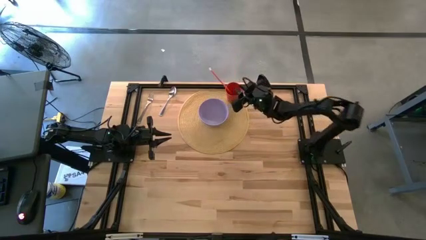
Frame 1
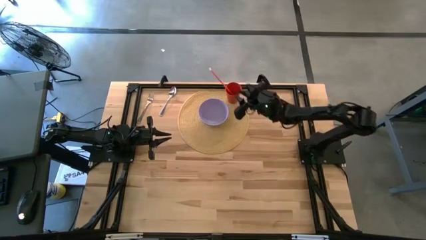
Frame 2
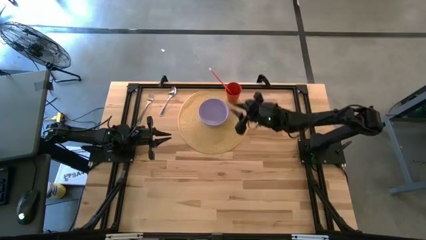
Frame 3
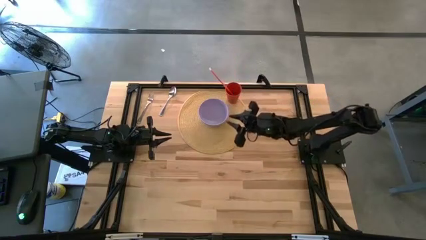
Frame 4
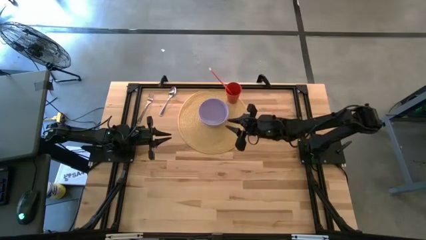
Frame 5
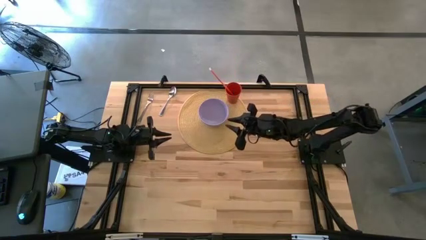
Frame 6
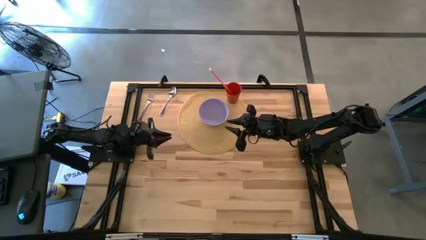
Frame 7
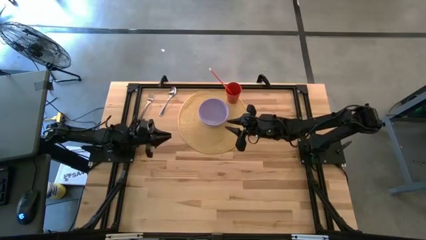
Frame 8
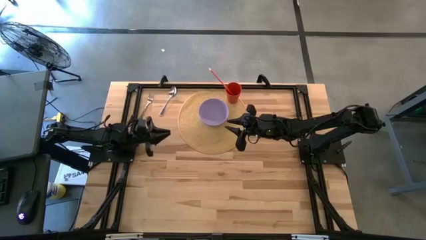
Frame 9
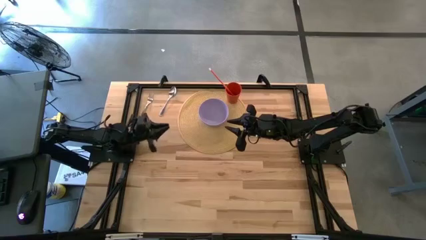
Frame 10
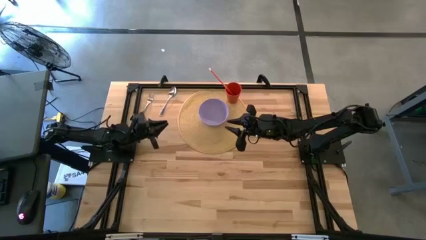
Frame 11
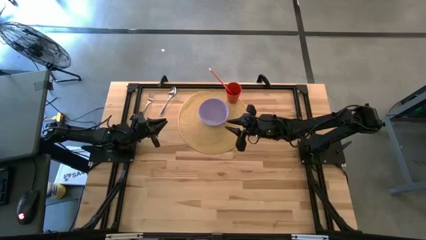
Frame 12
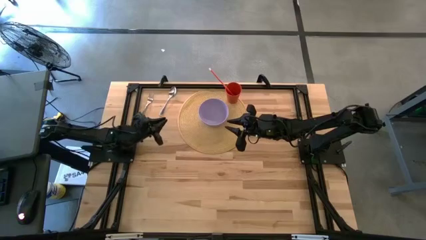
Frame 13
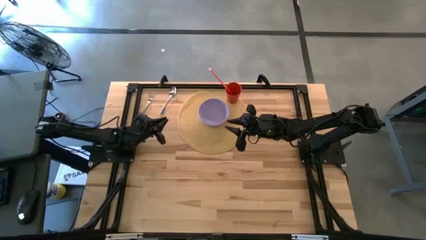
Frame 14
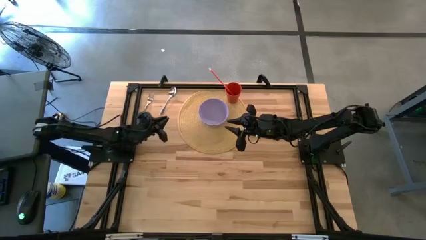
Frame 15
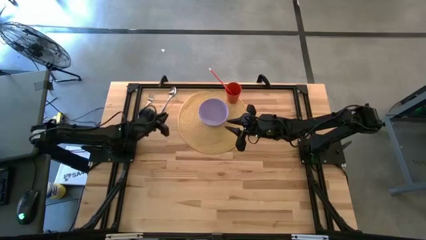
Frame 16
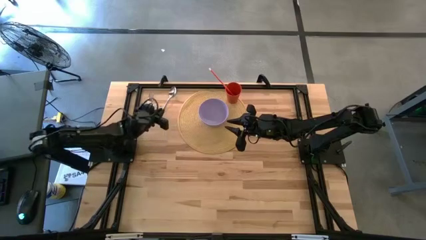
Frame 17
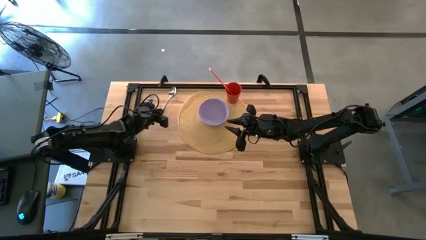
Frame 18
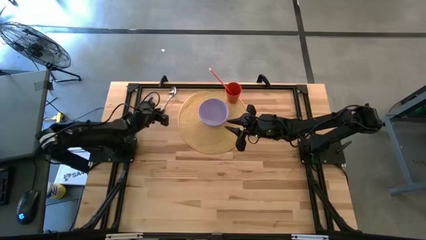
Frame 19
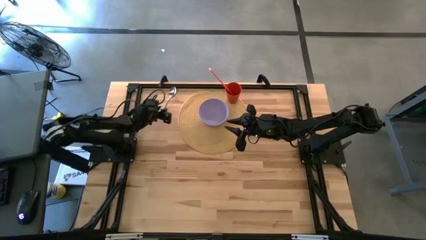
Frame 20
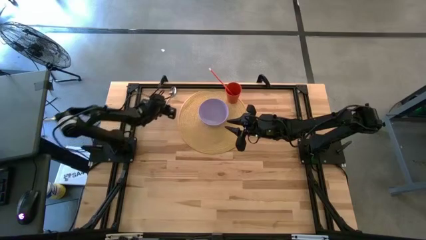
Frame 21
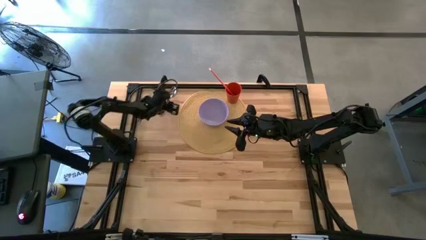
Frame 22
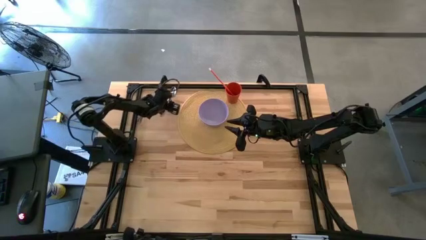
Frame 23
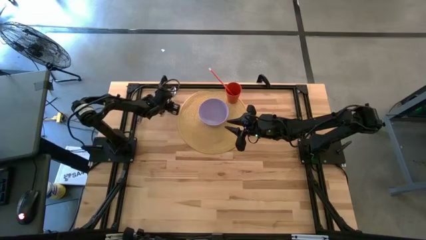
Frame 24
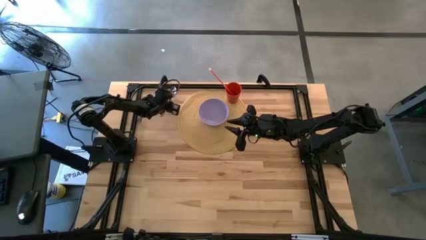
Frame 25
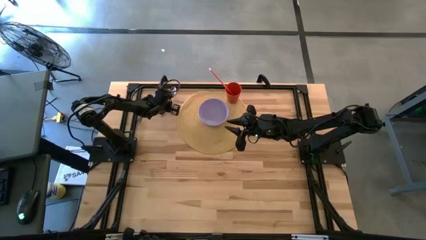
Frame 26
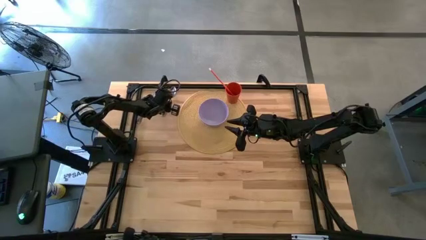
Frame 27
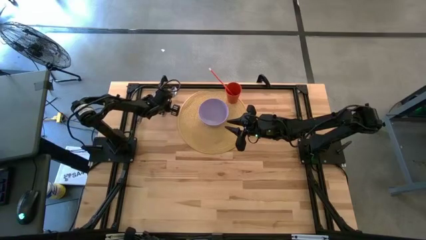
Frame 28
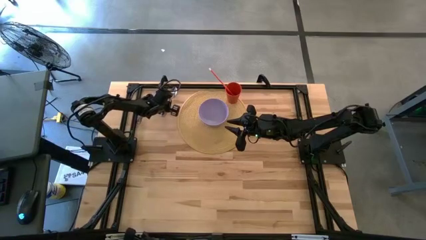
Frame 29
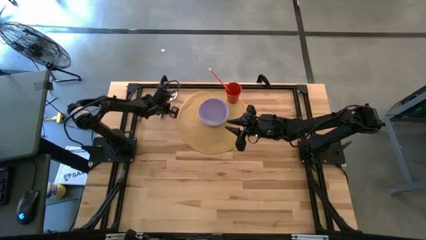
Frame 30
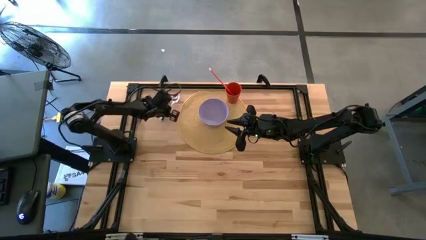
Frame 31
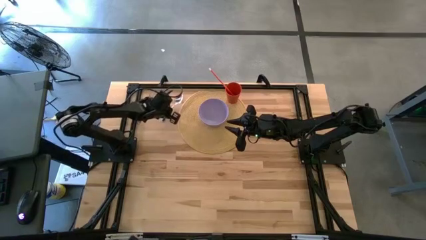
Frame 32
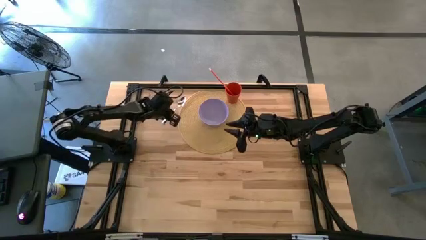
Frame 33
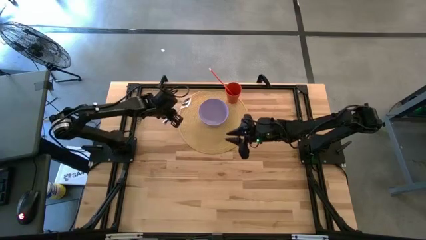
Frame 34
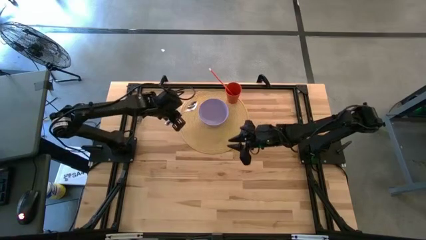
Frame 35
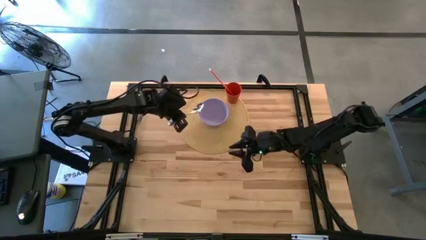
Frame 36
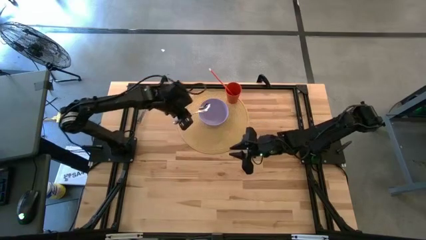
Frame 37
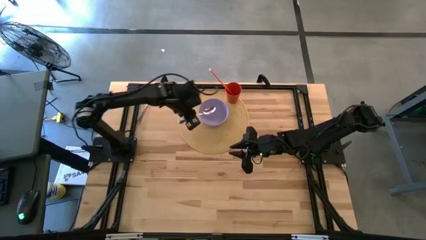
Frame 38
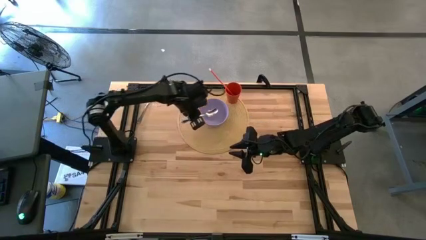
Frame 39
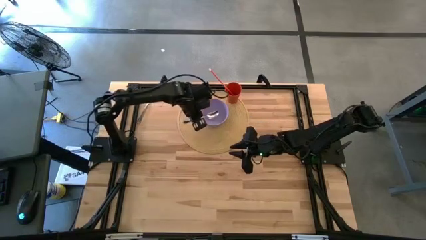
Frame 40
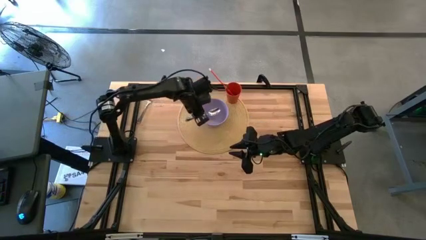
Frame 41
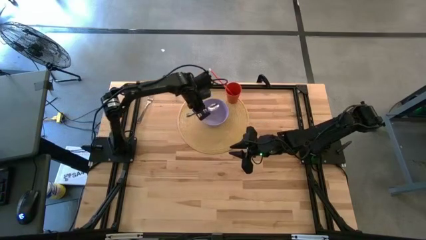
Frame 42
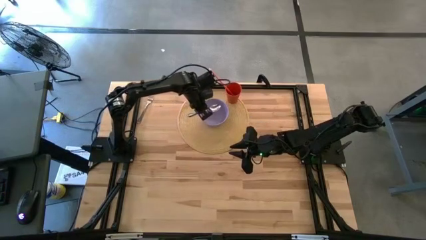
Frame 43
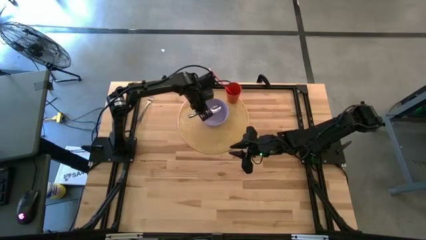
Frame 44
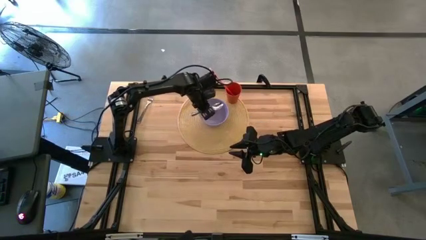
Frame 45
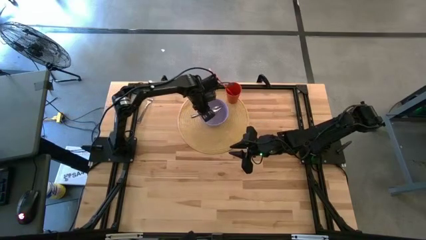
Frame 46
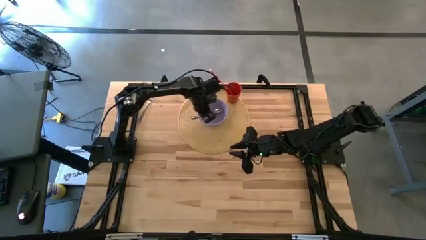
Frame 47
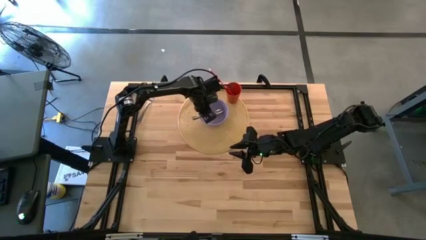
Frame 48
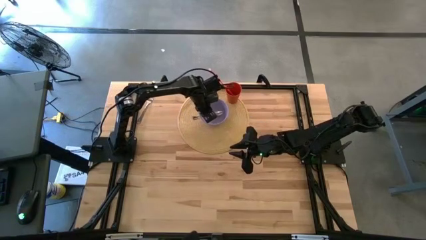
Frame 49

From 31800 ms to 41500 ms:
Task: Pick & Place Utensil
Put the silver spoon in the purple bowl
